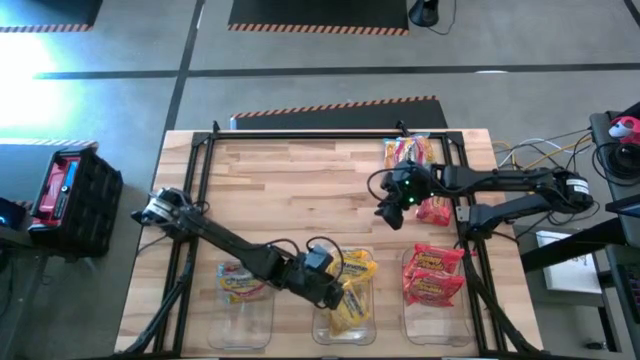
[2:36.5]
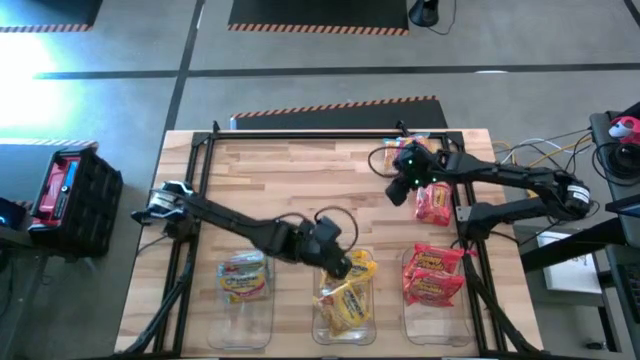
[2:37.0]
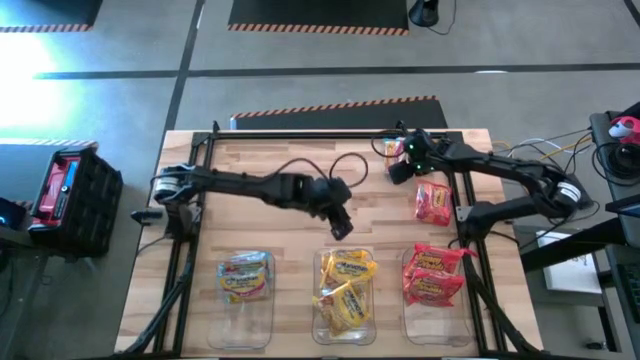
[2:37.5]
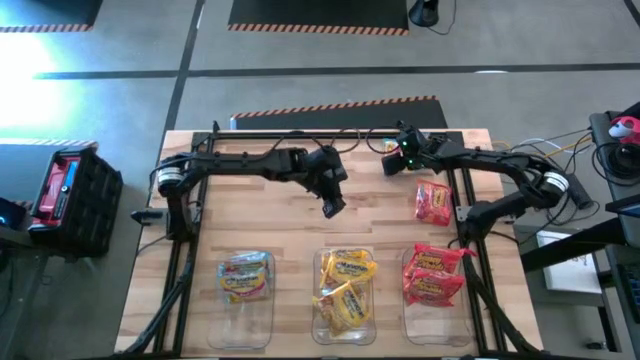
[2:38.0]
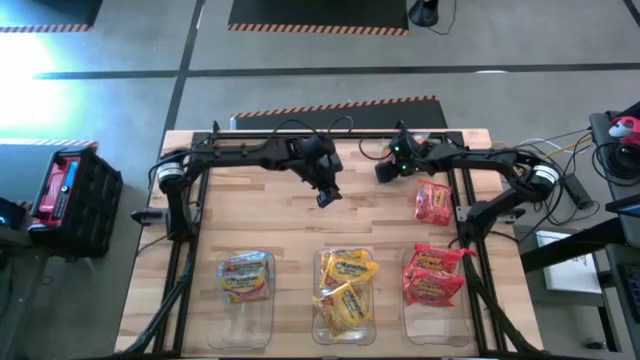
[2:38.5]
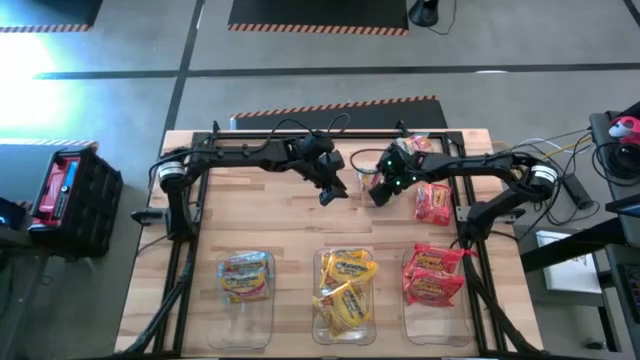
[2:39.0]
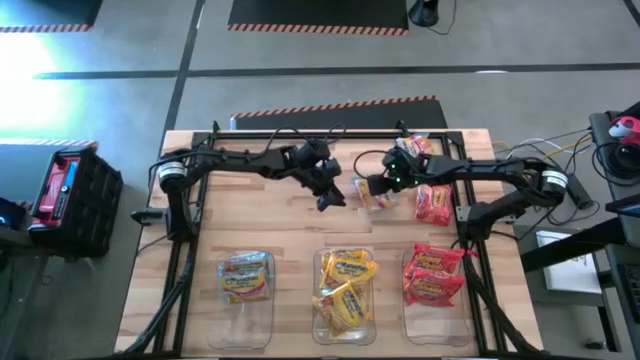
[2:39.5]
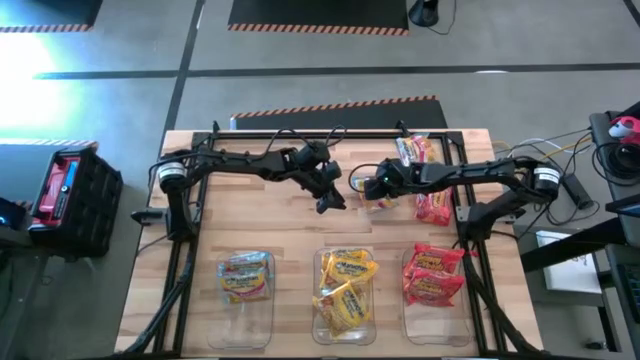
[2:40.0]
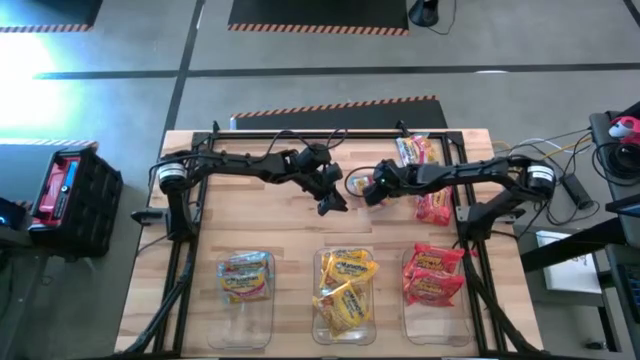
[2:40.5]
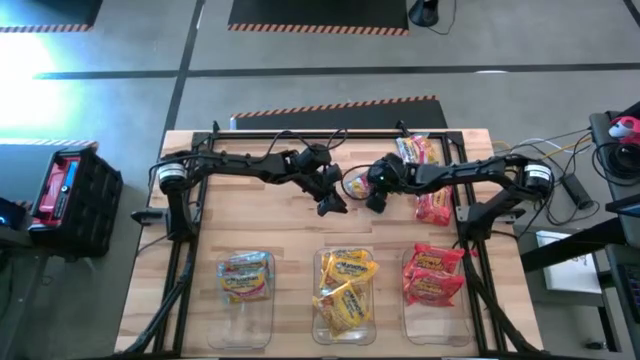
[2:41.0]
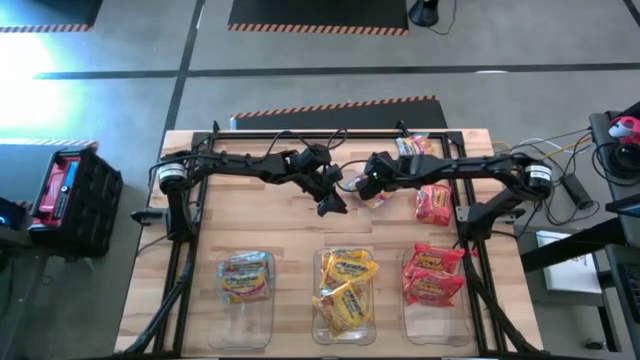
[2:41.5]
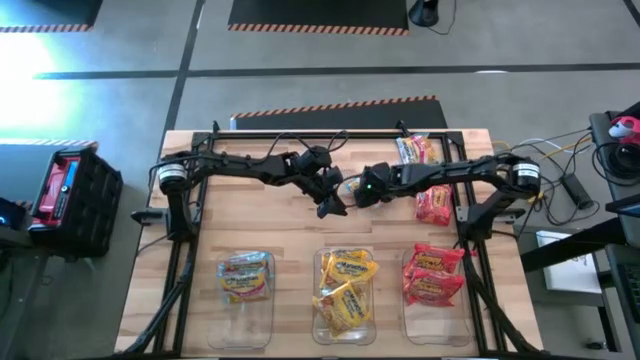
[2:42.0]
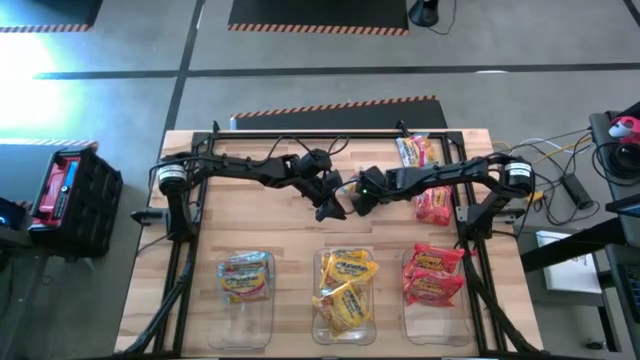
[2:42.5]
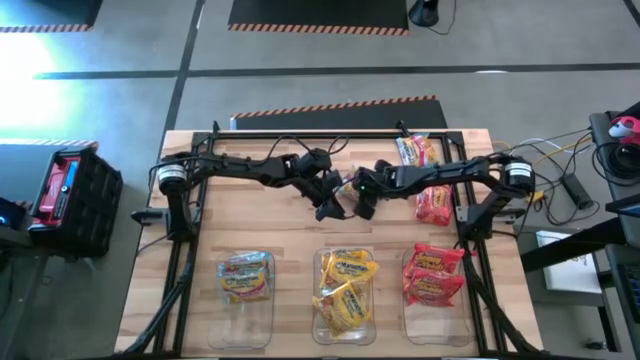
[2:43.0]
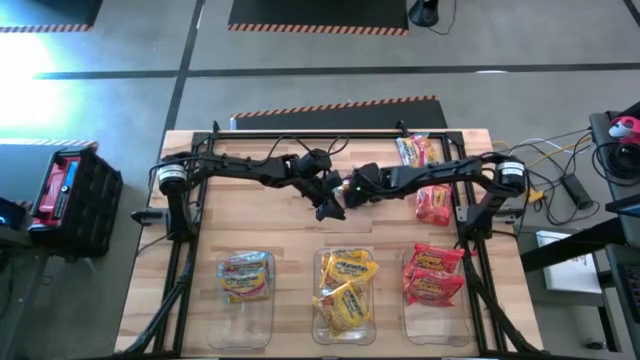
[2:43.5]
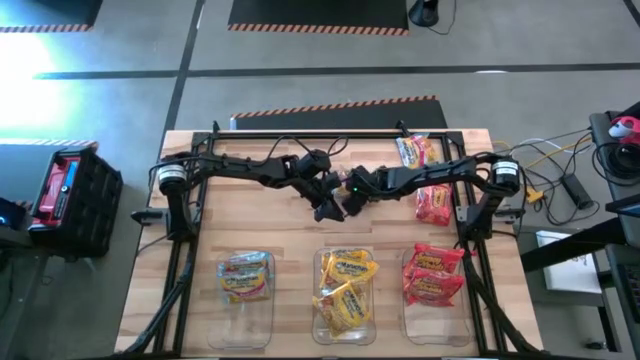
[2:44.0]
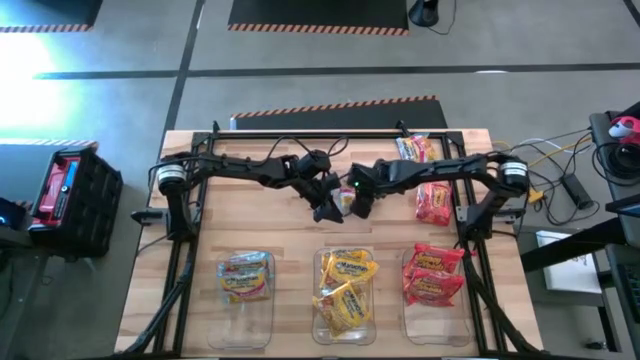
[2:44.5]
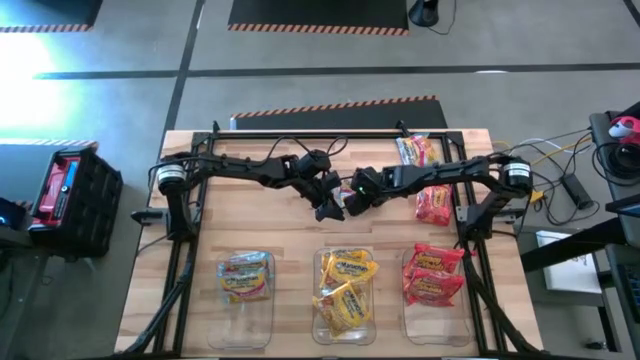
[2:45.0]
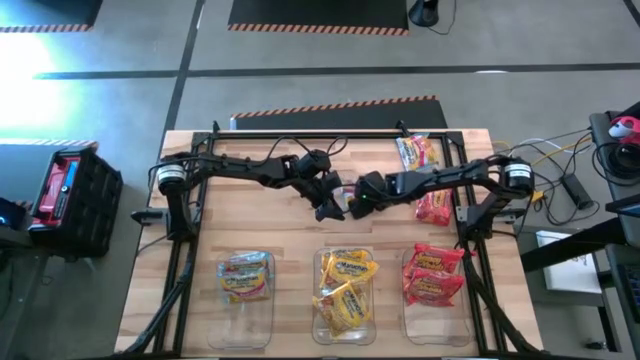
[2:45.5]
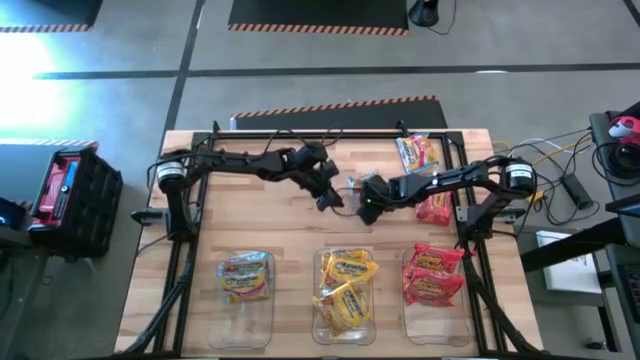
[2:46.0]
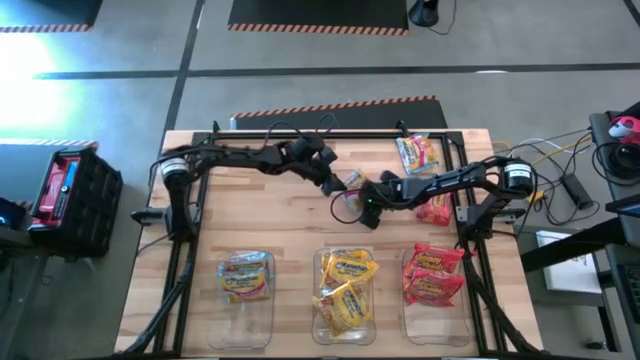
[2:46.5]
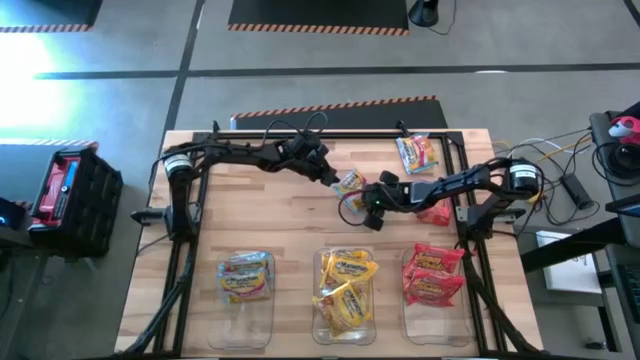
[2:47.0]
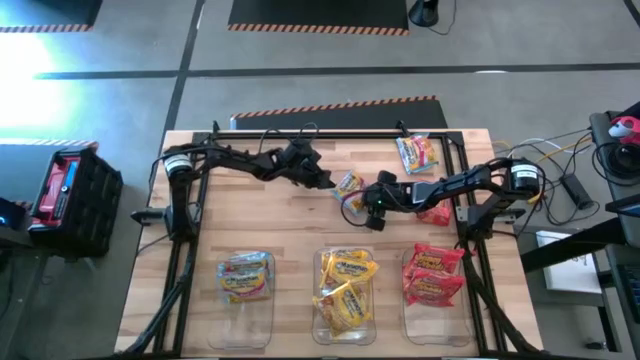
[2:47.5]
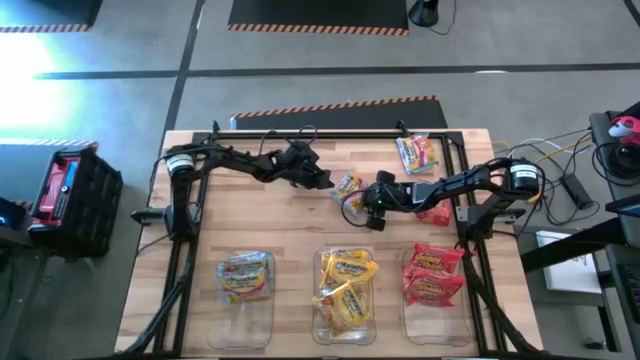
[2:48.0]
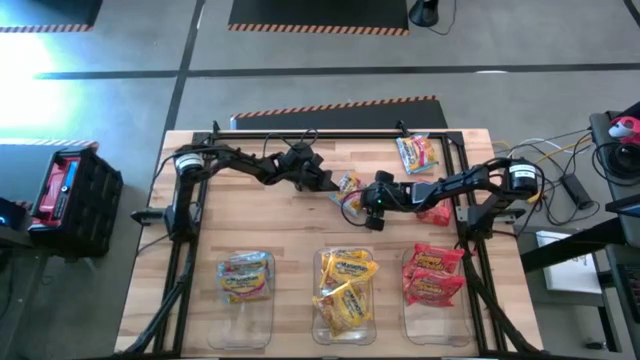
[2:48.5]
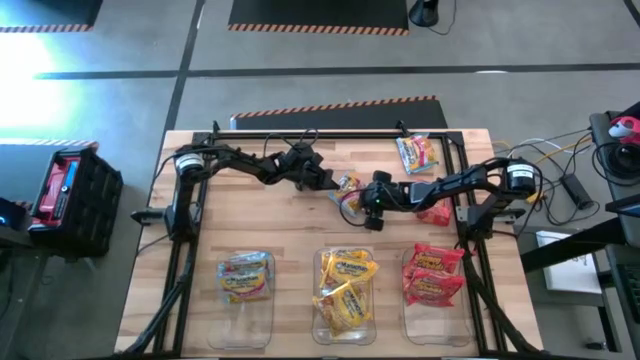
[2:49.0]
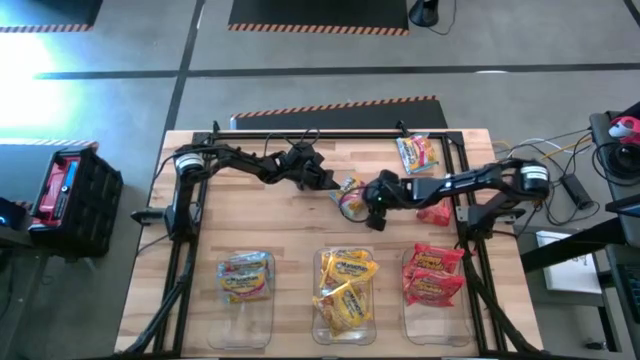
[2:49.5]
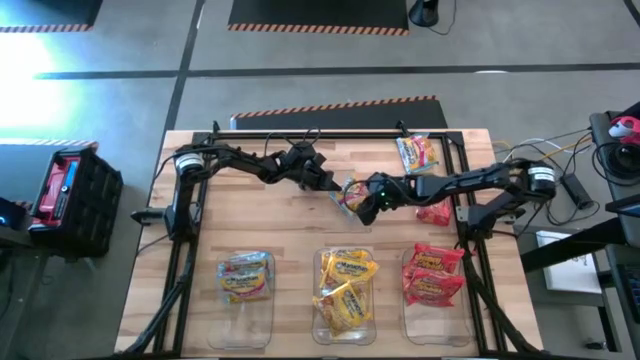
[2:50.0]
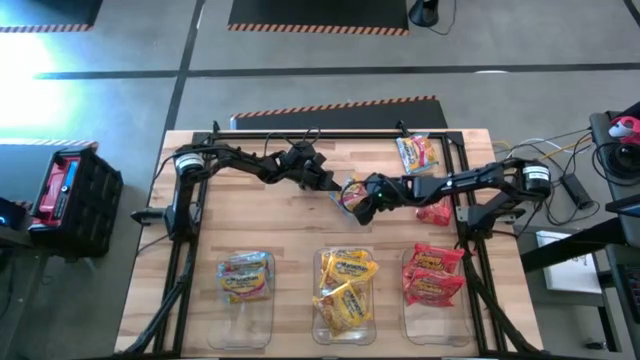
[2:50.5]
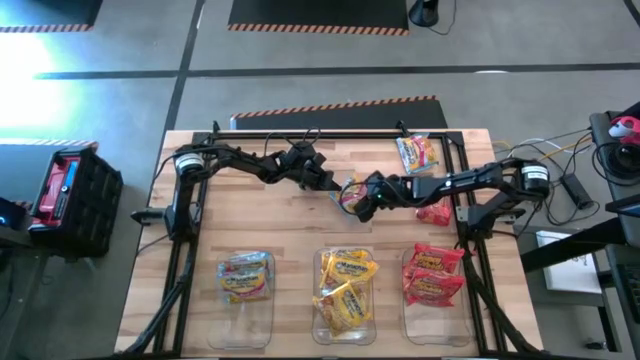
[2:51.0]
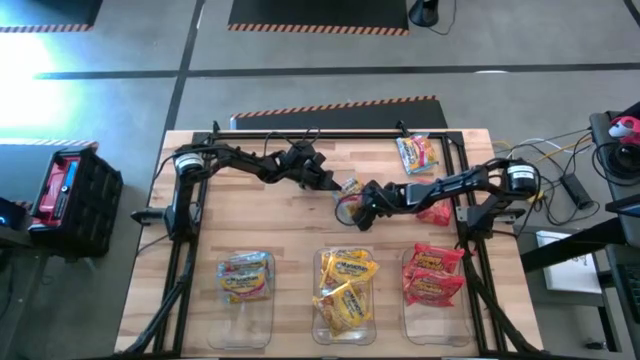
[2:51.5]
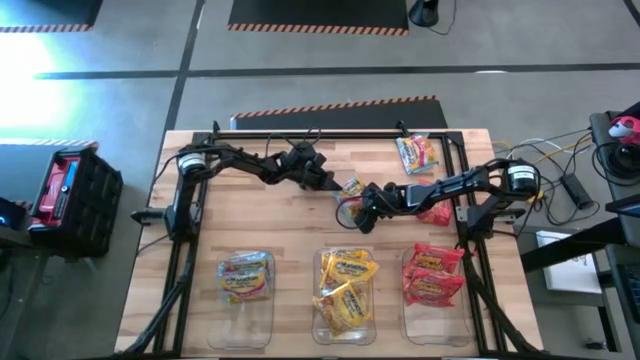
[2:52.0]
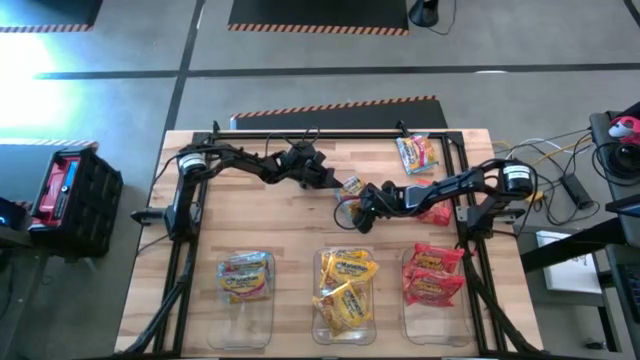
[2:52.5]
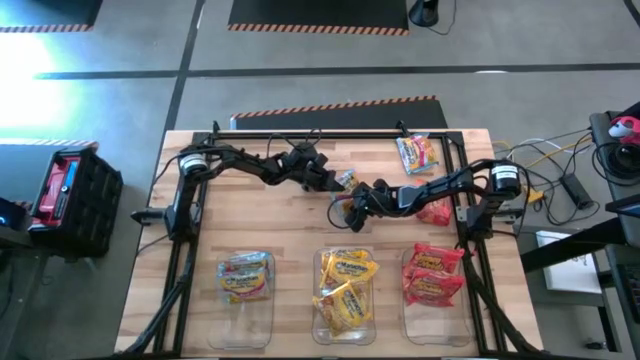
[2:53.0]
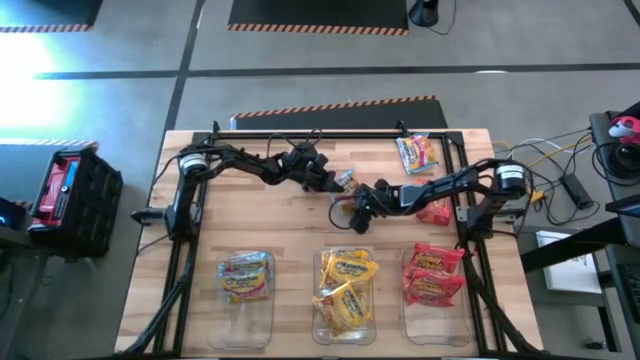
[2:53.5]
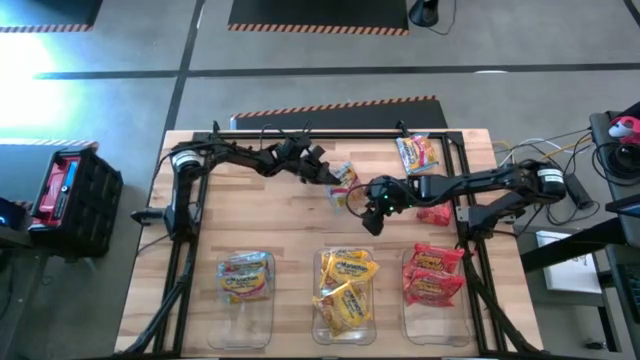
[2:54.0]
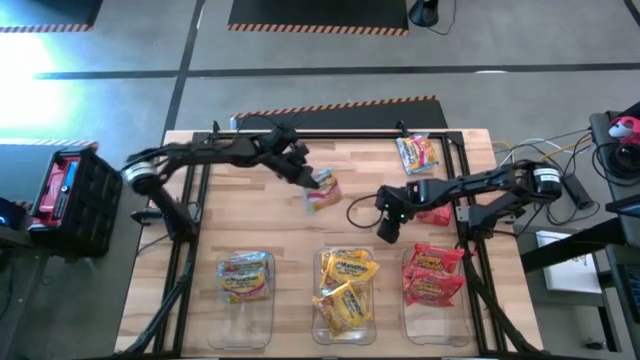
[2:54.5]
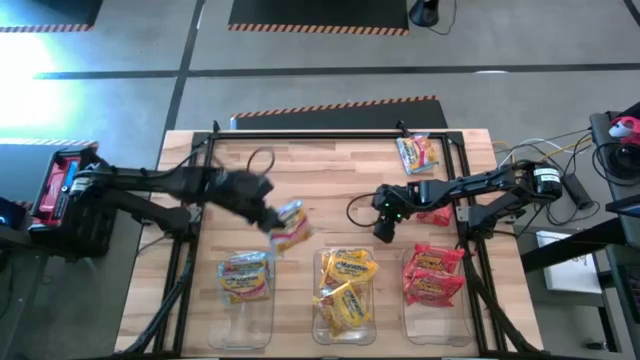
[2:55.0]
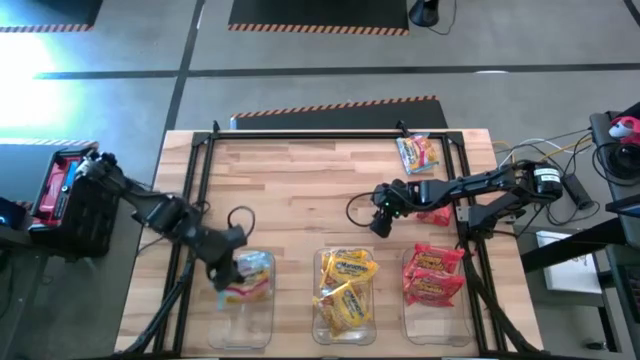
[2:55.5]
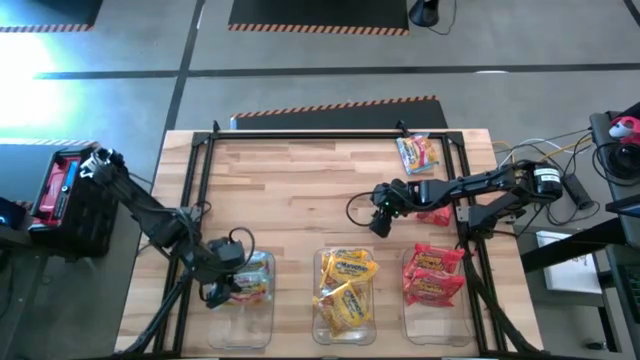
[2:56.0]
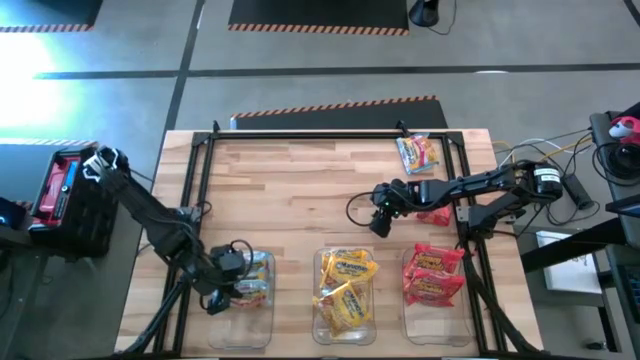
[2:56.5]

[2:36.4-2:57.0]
Task: Sort Maruchan noodles
Put the blue noodle pack into the left transparent bin
